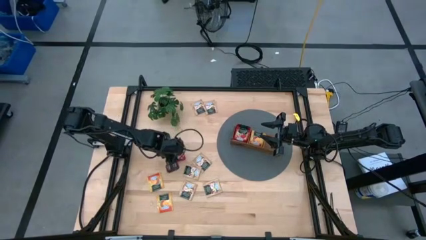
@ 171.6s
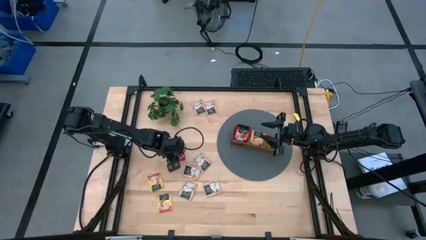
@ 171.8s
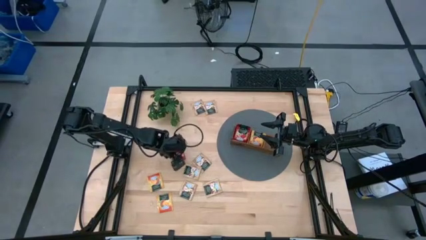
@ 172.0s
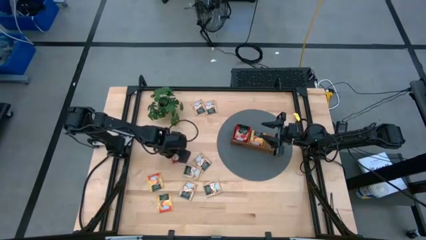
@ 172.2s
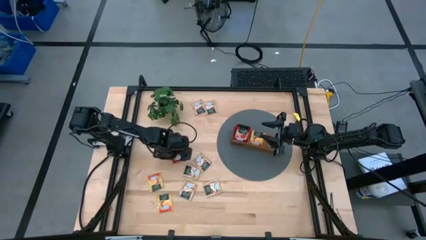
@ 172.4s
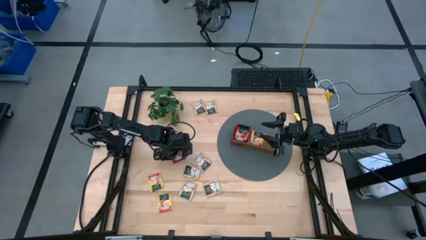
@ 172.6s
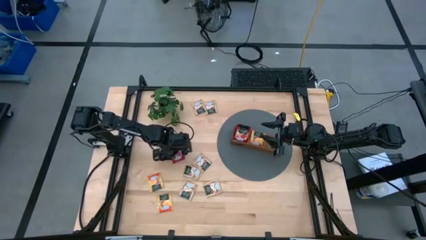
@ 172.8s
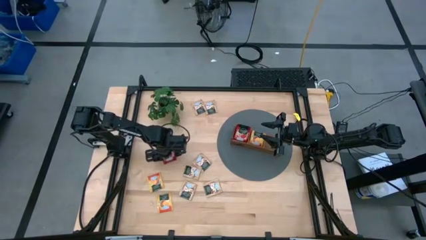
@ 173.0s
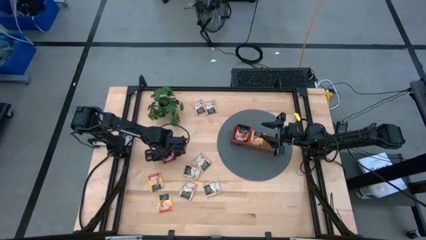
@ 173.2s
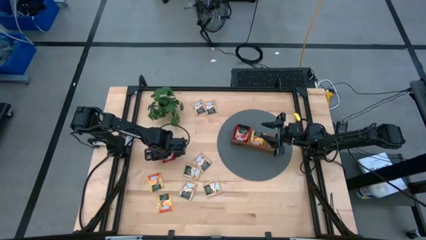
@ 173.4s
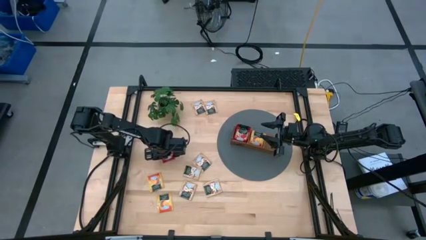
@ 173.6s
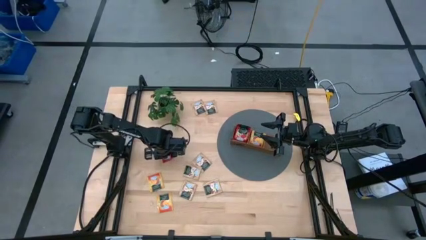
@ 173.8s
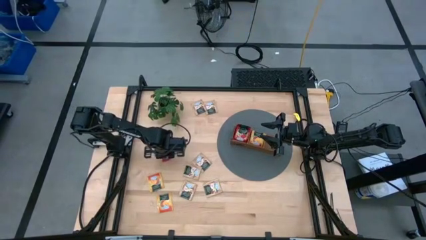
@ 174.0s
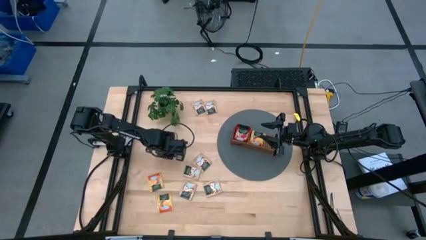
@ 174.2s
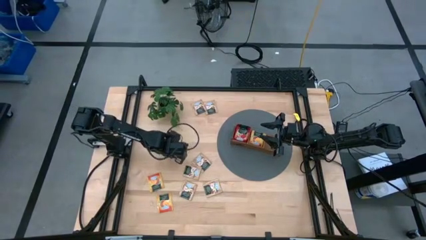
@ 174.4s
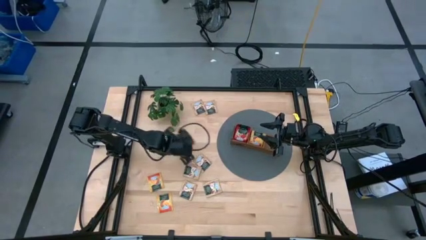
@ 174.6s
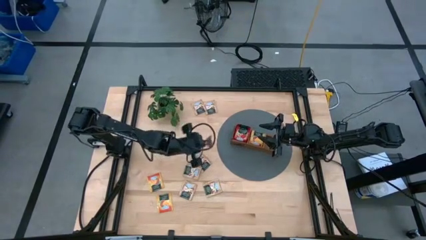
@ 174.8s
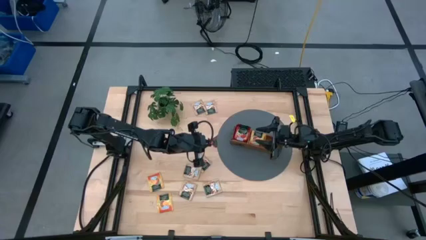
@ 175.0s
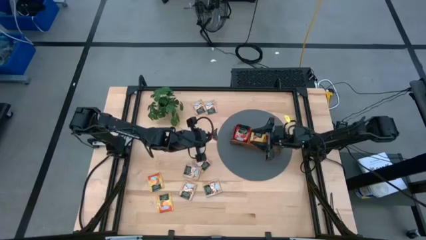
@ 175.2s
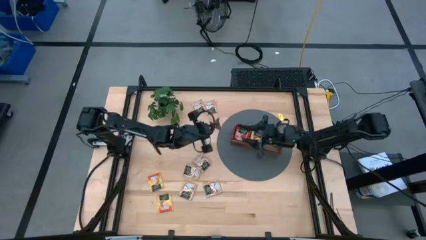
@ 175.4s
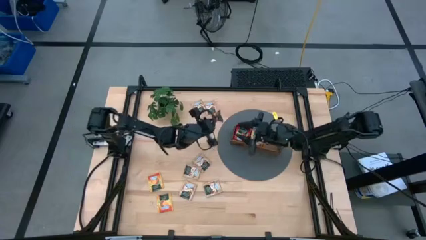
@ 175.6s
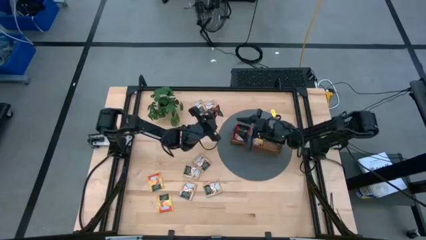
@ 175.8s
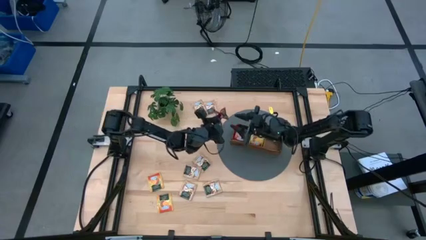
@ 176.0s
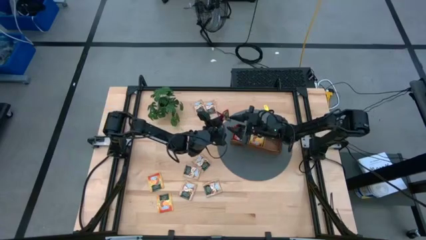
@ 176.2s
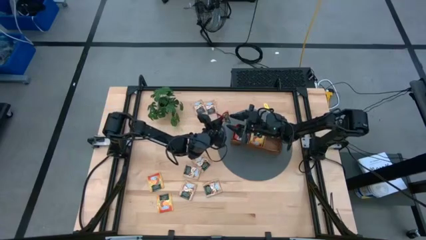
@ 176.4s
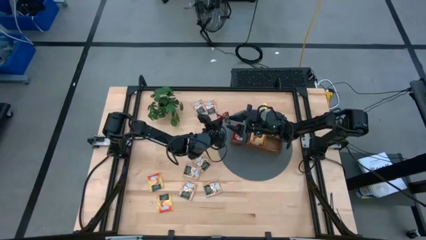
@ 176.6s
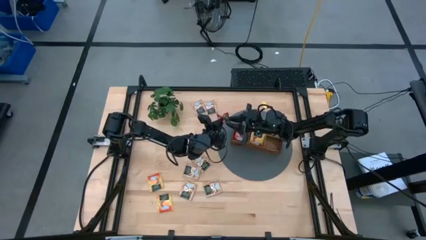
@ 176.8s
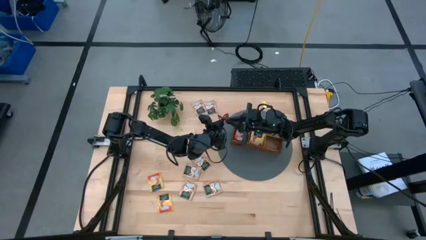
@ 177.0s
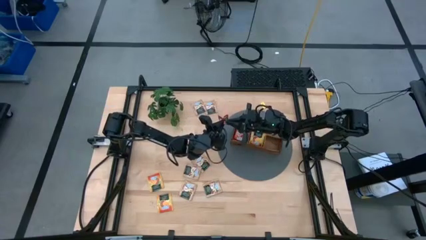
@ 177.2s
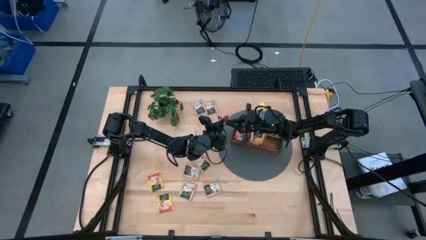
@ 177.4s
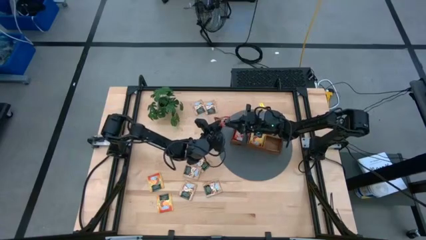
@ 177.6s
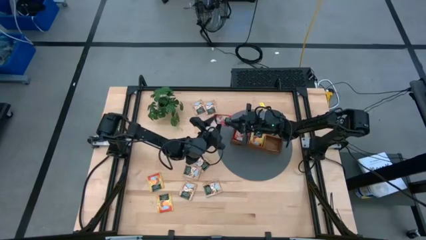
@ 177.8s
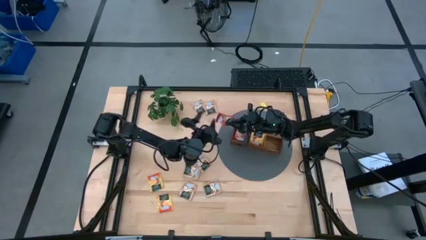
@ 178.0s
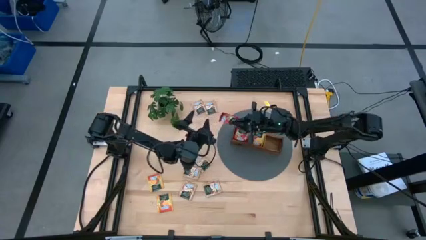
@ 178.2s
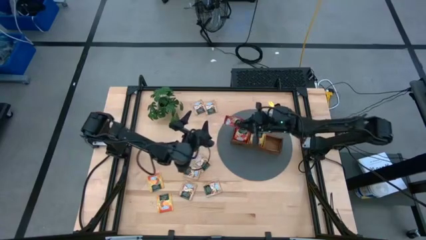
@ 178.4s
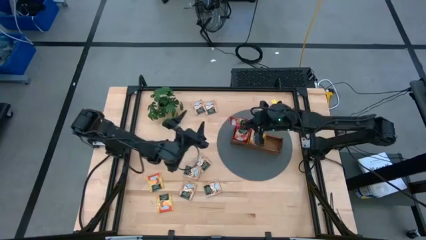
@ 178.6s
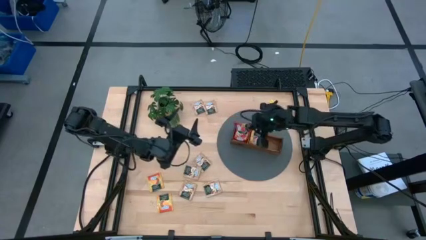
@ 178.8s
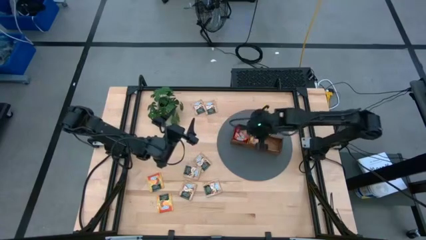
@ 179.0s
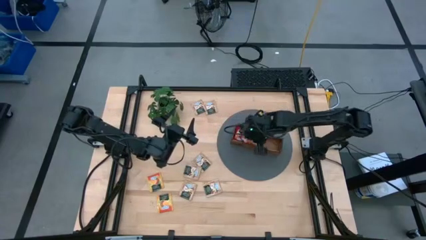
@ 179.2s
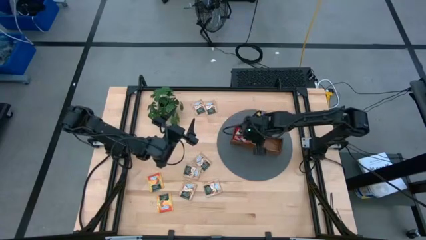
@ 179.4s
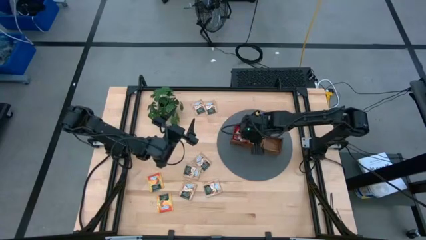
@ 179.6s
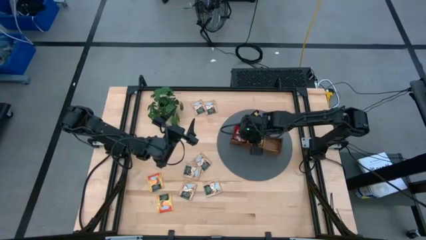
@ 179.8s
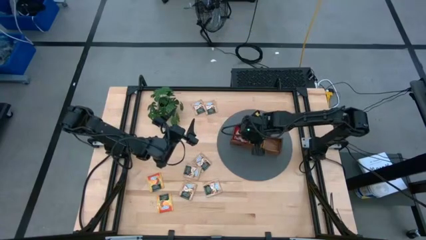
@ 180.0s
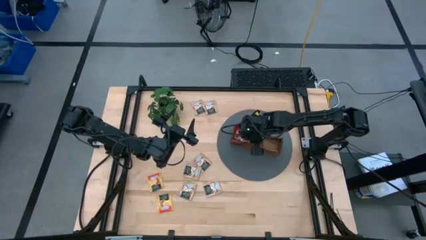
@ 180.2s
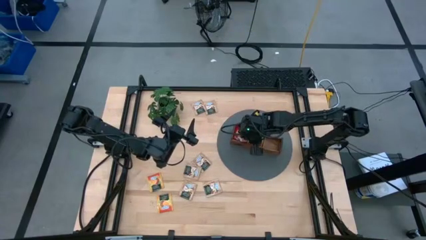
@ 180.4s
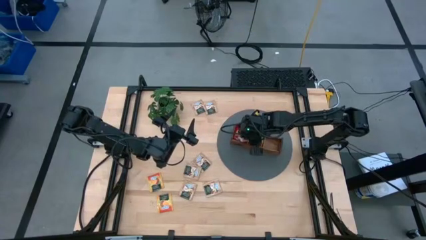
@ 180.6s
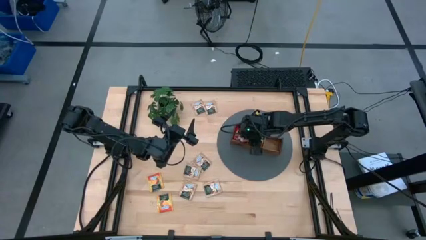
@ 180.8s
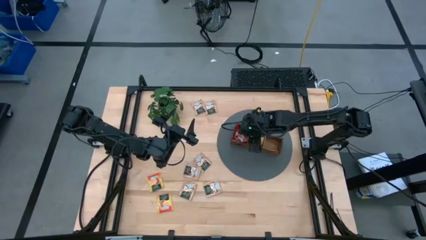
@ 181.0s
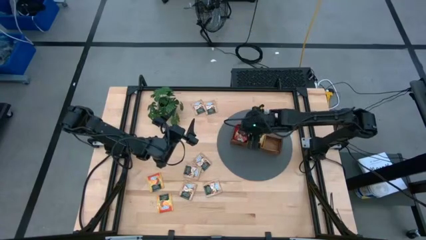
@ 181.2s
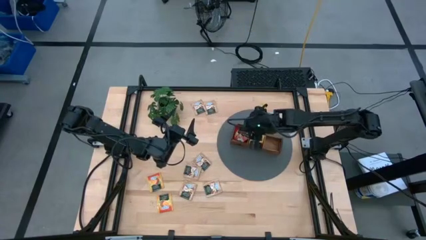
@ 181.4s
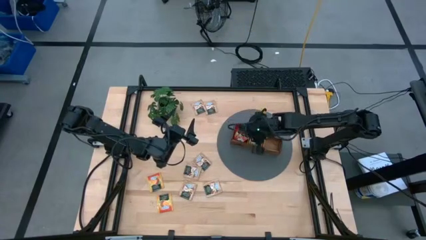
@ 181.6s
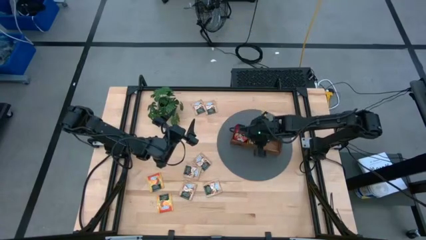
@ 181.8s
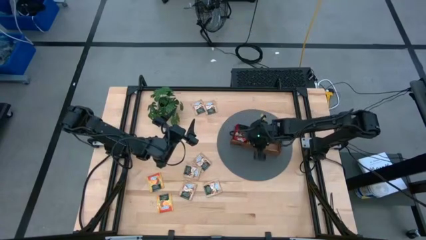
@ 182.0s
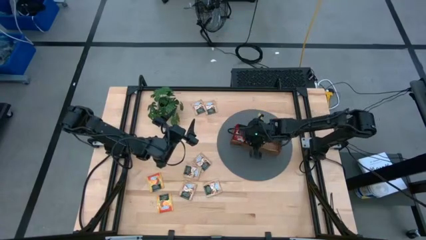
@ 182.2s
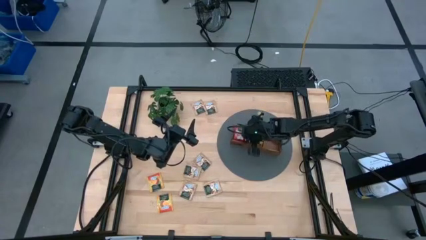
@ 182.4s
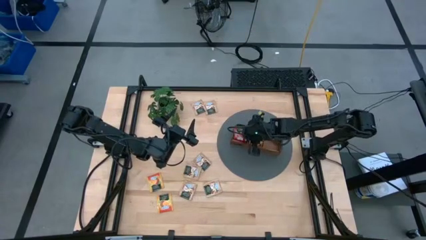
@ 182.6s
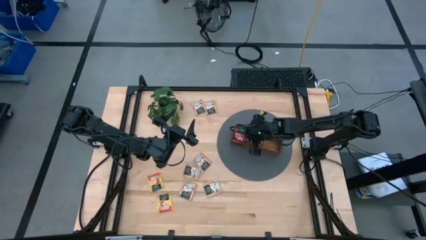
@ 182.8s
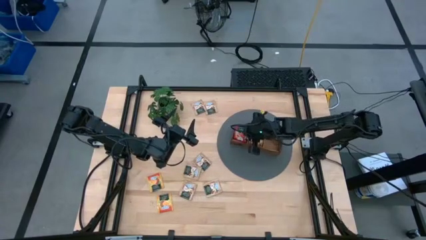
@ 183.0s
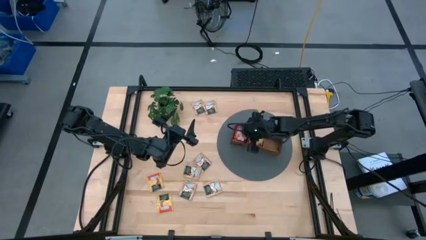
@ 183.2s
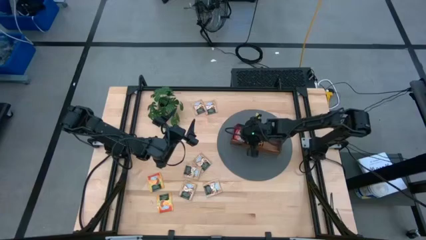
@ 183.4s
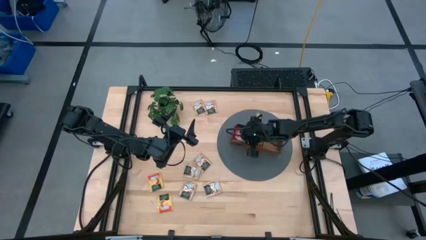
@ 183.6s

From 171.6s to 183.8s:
Task: Pick & Place Tea
Put the red tea bag into the left section of the wooden organizer

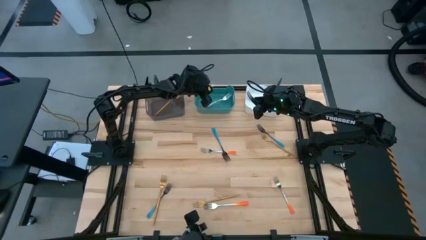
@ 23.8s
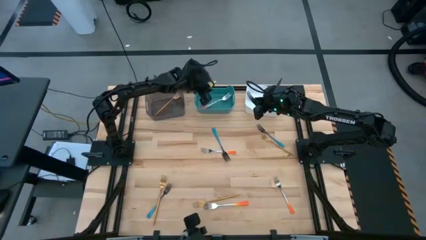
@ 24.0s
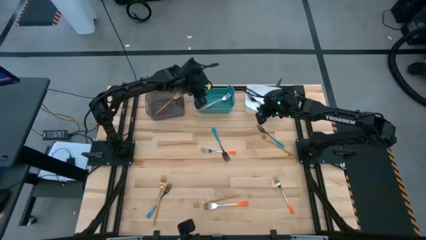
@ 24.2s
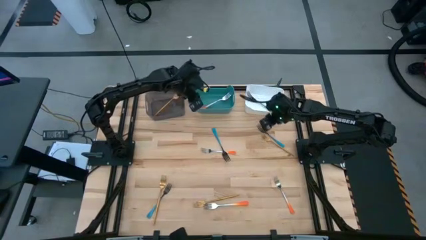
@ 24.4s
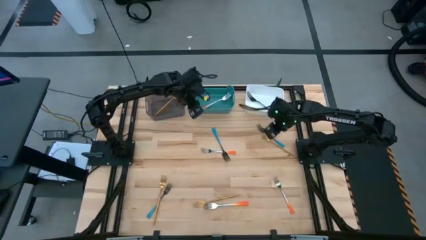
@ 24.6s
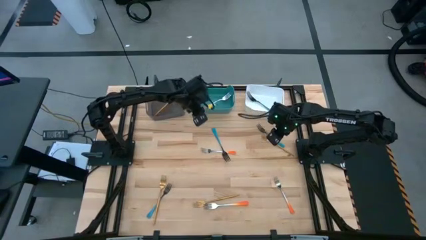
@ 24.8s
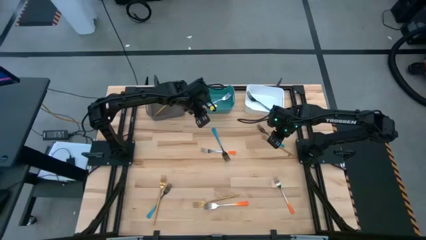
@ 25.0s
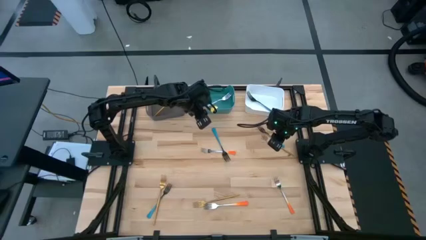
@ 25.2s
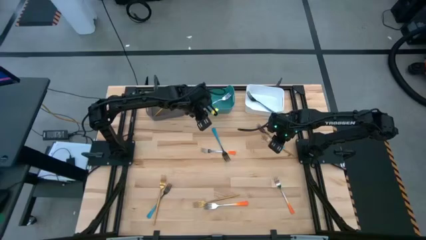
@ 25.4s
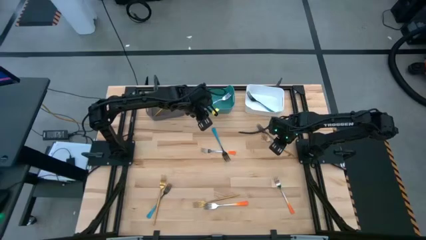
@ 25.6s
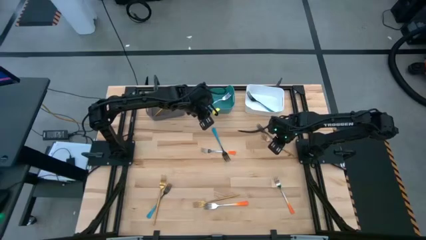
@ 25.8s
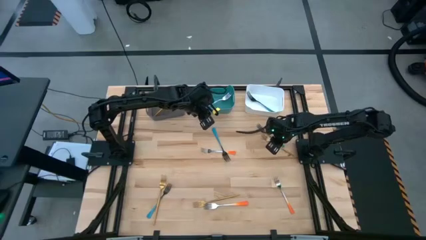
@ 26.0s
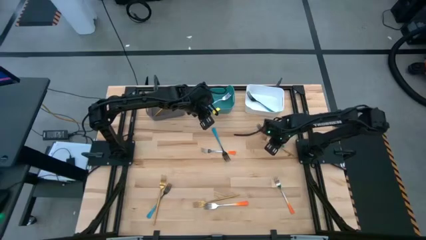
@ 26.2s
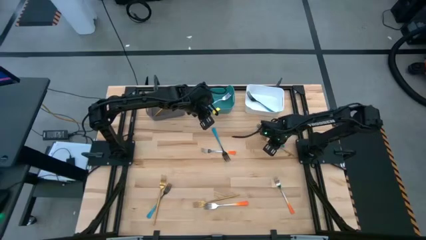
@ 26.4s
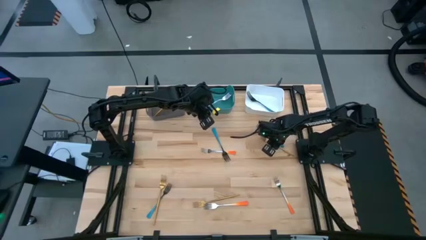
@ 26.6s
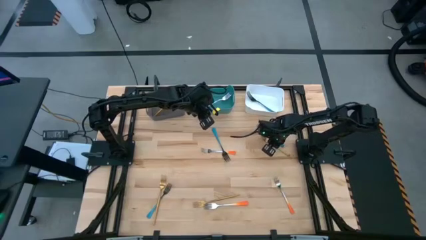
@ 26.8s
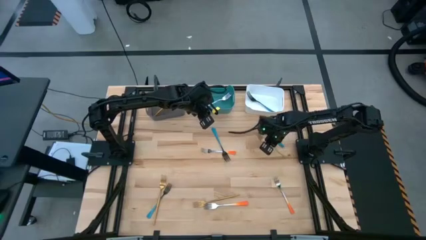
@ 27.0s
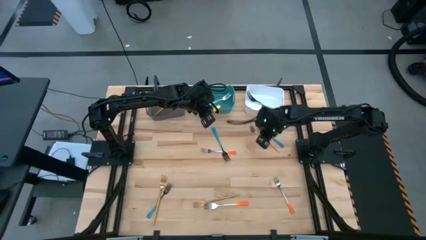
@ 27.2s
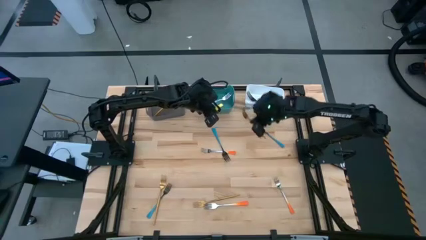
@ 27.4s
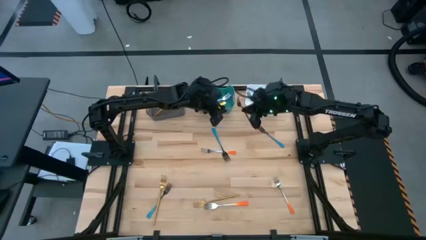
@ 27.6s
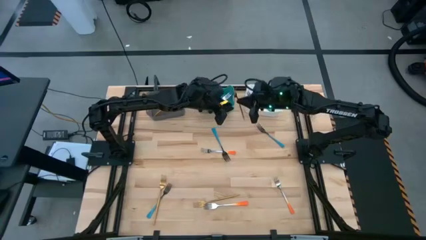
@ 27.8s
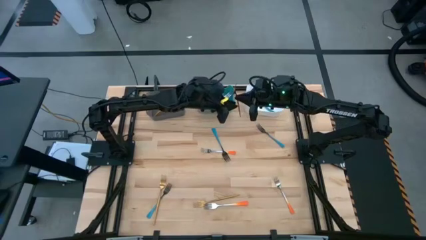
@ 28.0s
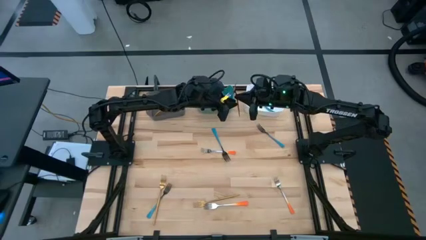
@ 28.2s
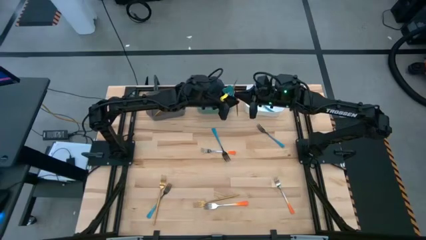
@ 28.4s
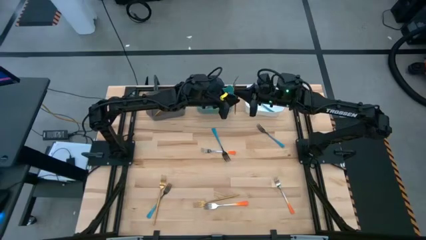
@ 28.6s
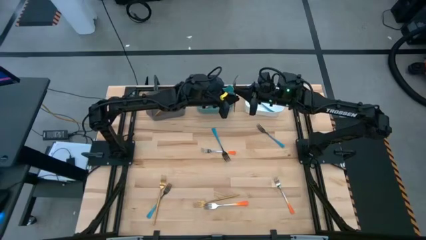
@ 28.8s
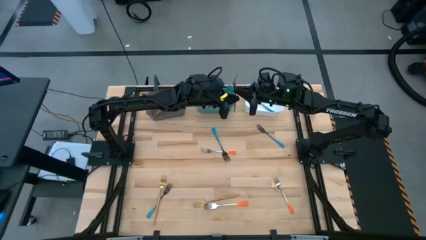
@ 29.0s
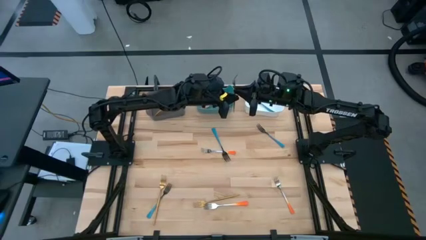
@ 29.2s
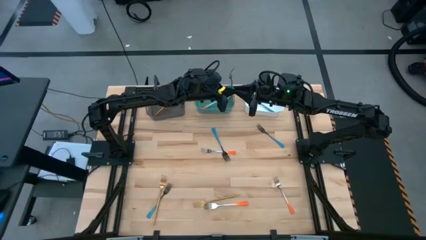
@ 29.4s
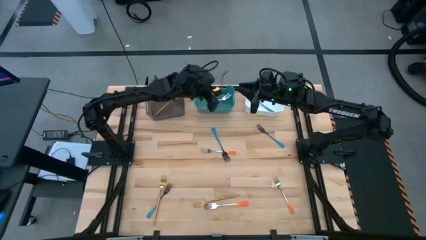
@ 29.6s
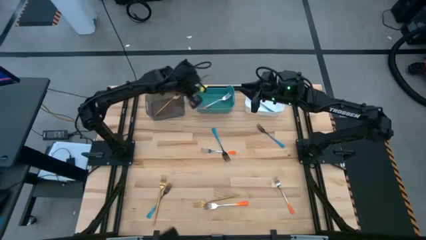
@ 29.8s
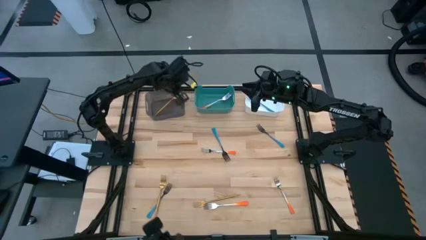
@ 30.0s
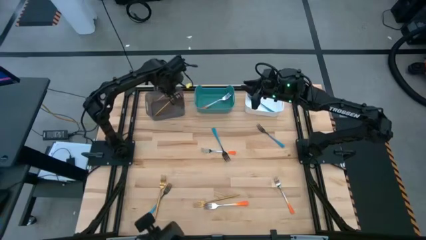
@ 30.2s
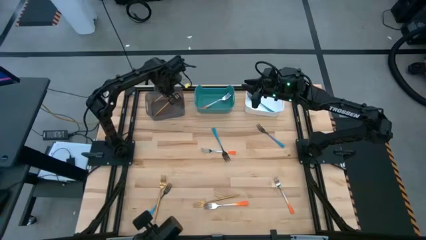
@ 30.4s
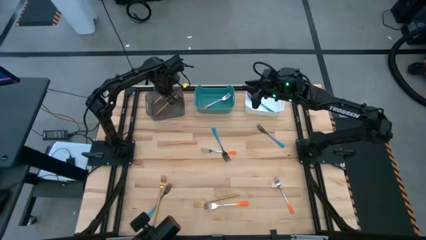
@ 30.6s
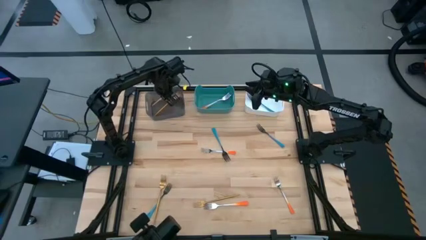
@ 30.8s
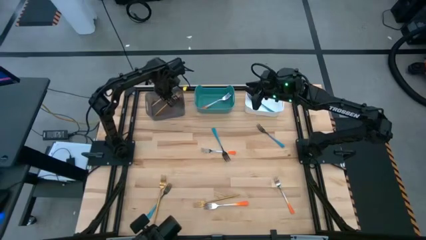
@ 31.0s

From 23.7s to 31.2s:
Task: Sort silverware by color (type)
Put the gold fork into the black bin
